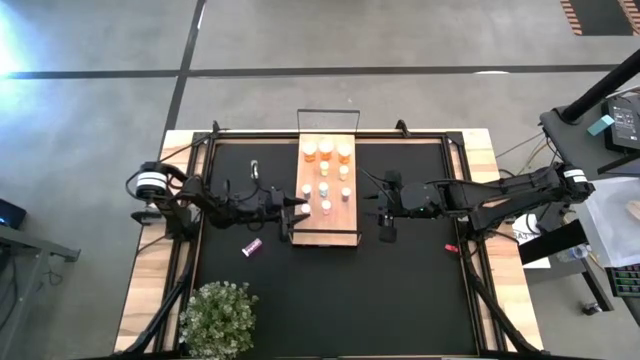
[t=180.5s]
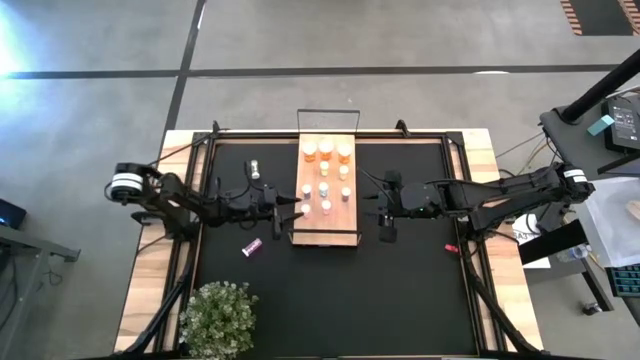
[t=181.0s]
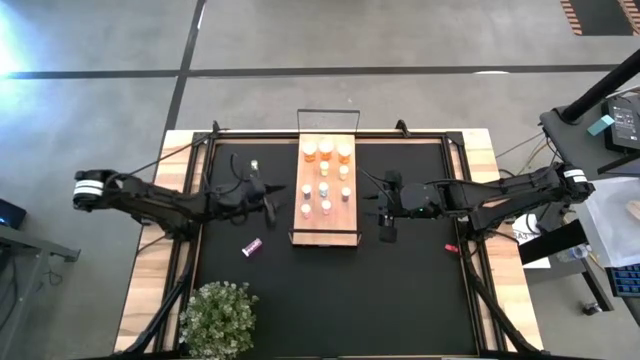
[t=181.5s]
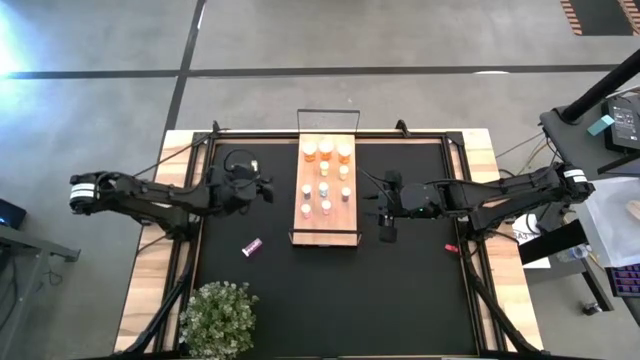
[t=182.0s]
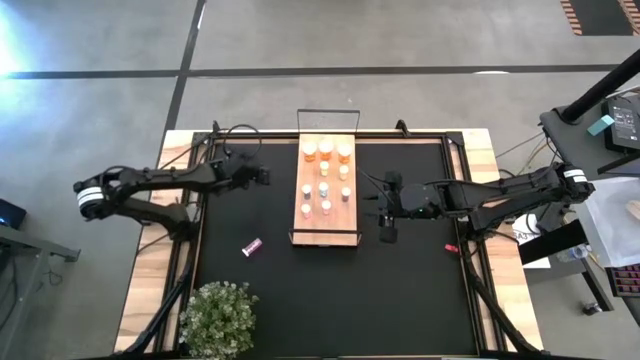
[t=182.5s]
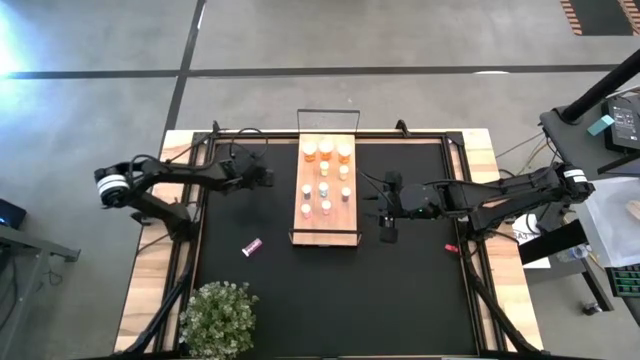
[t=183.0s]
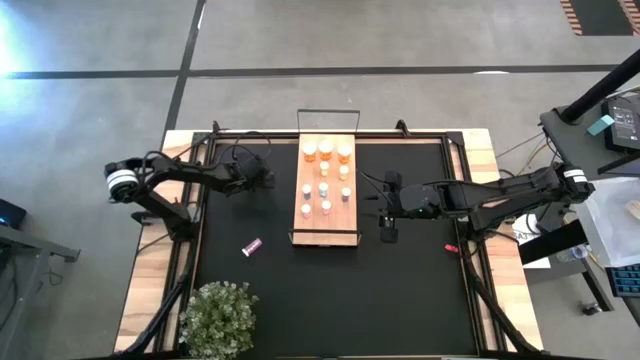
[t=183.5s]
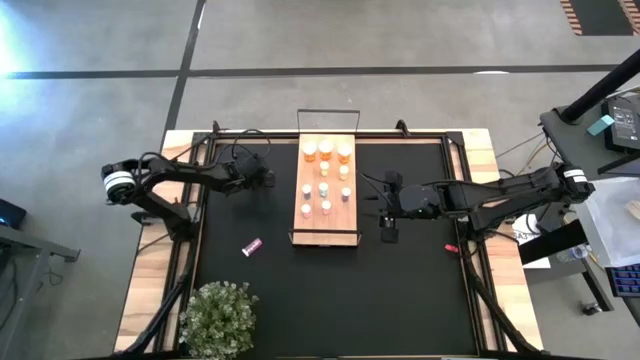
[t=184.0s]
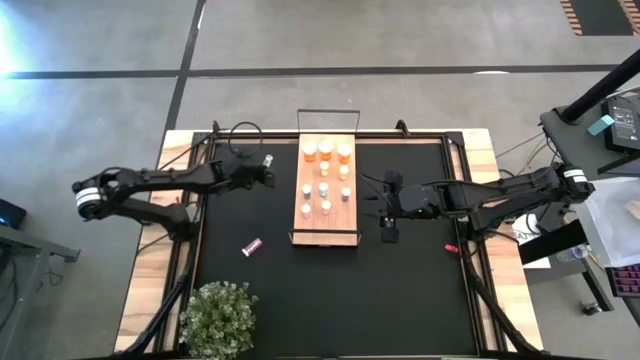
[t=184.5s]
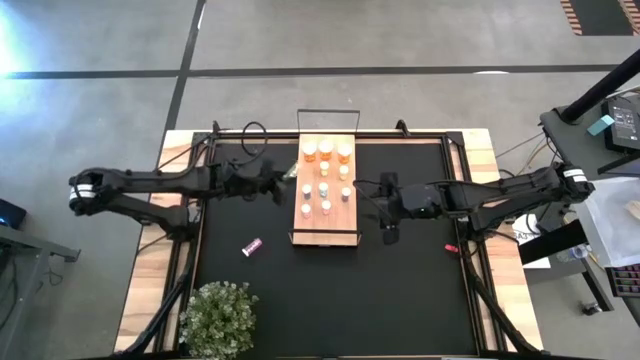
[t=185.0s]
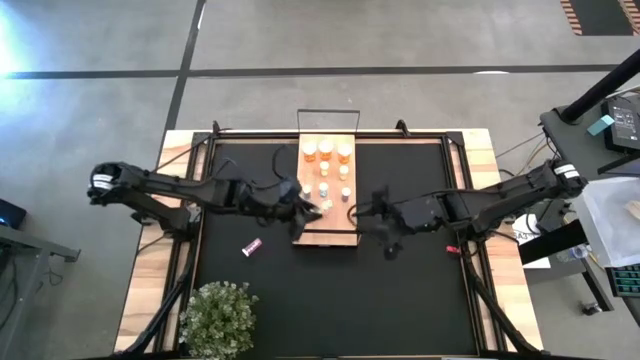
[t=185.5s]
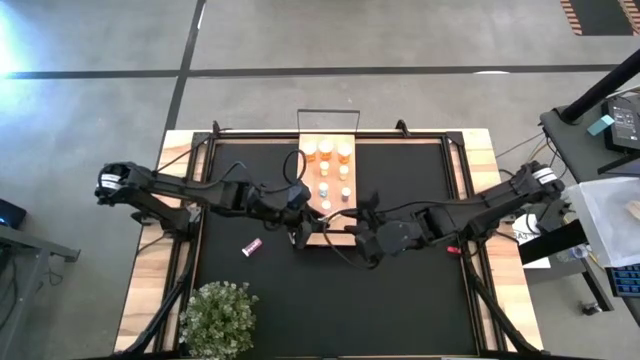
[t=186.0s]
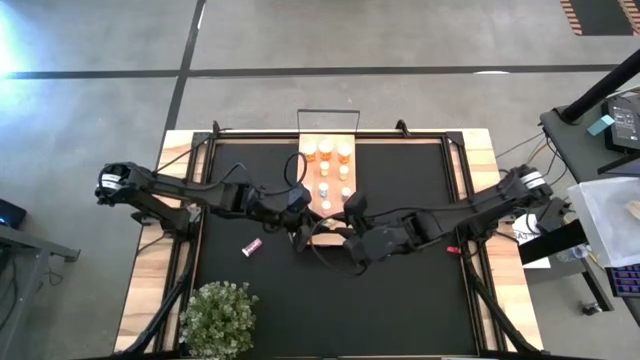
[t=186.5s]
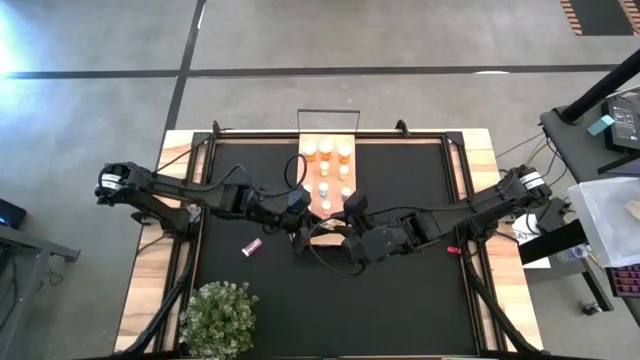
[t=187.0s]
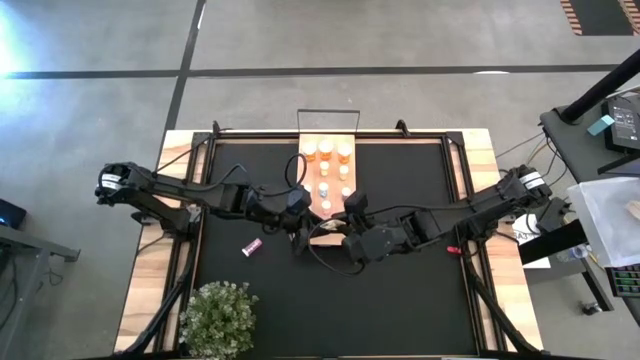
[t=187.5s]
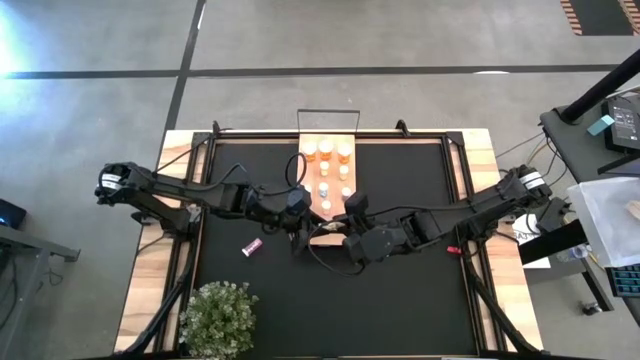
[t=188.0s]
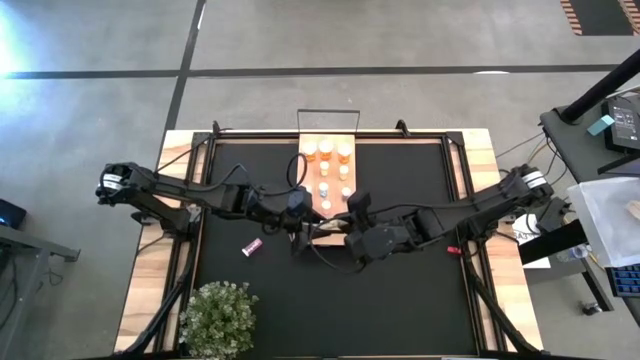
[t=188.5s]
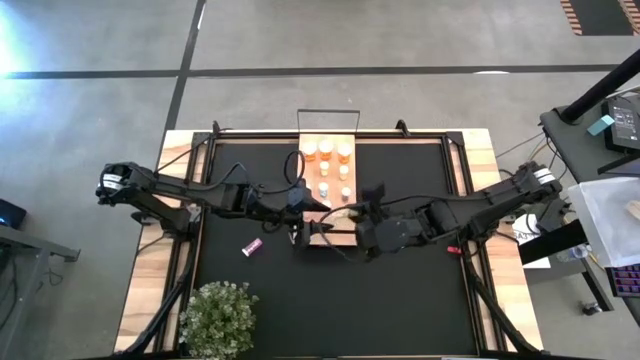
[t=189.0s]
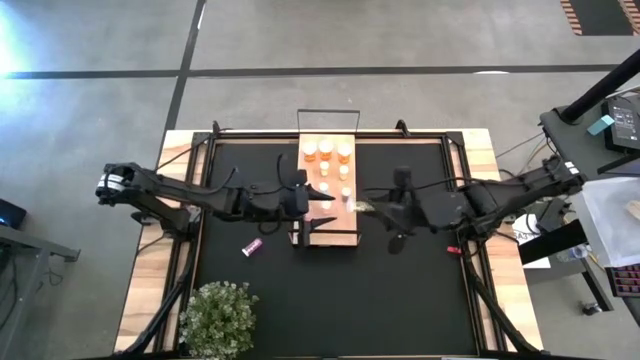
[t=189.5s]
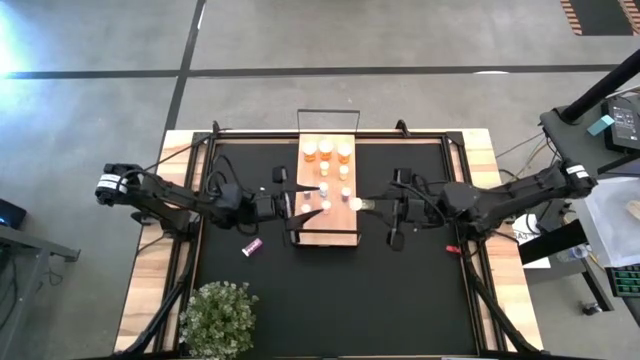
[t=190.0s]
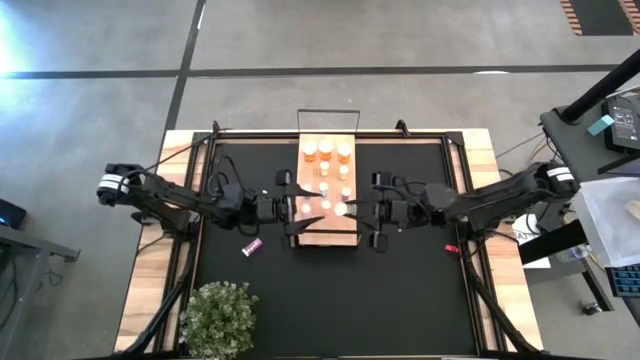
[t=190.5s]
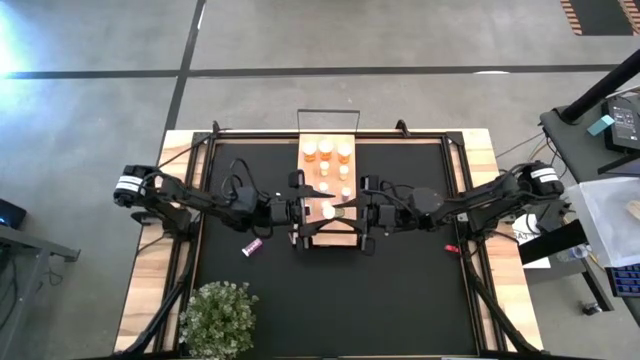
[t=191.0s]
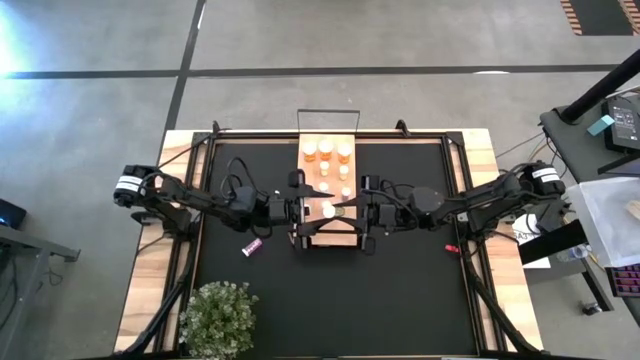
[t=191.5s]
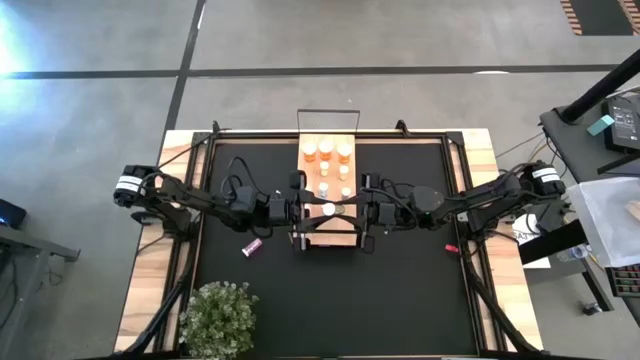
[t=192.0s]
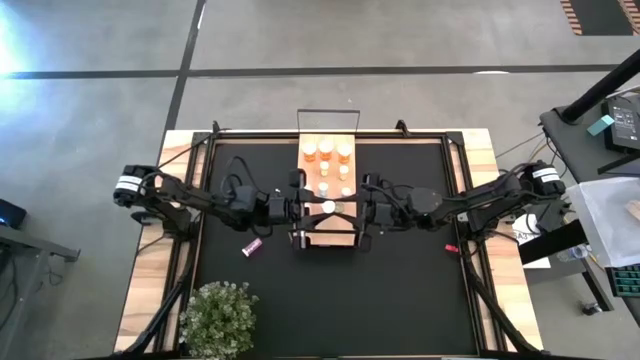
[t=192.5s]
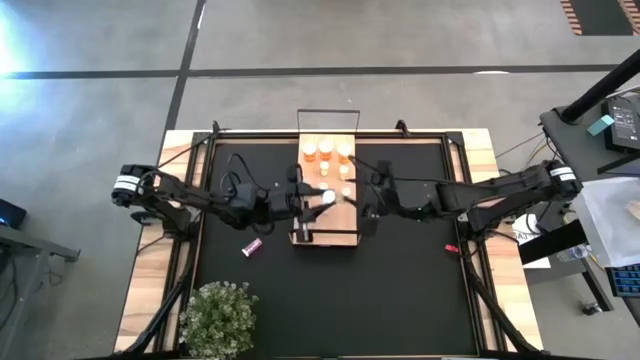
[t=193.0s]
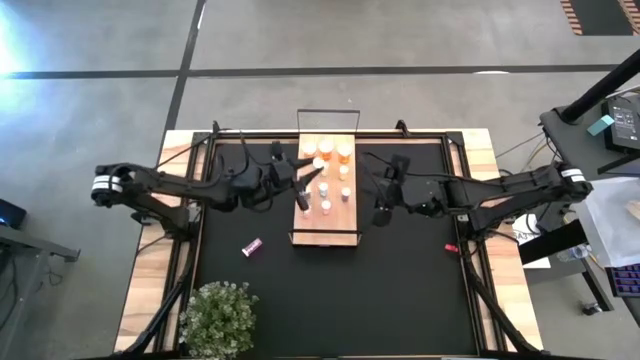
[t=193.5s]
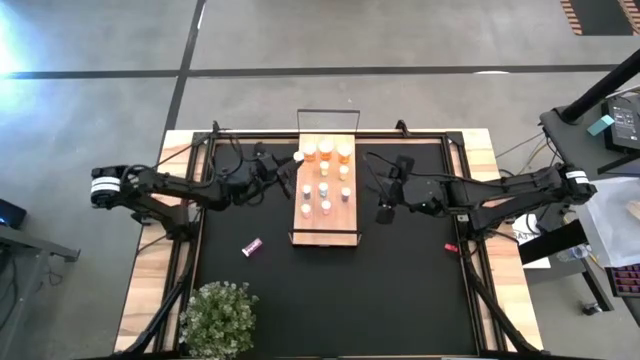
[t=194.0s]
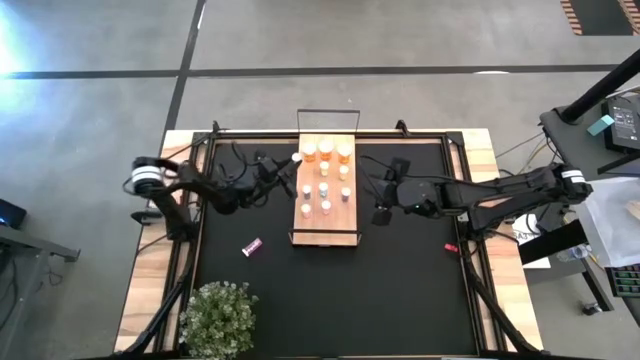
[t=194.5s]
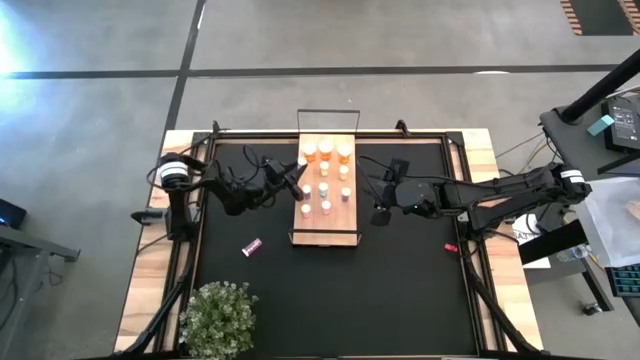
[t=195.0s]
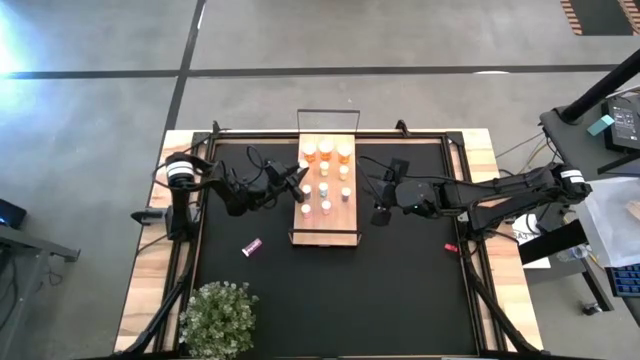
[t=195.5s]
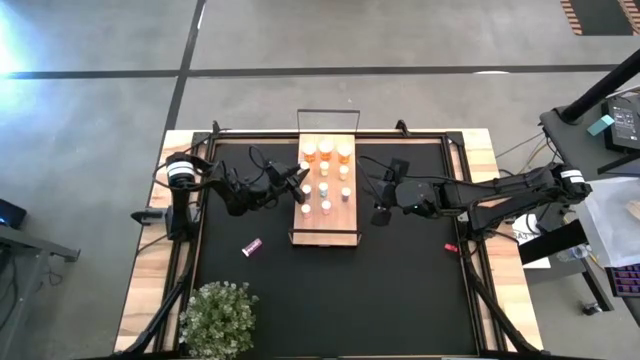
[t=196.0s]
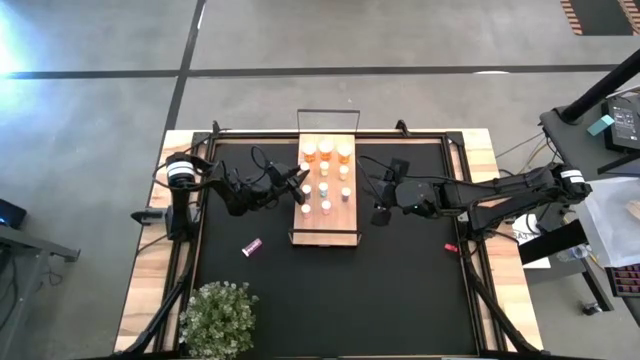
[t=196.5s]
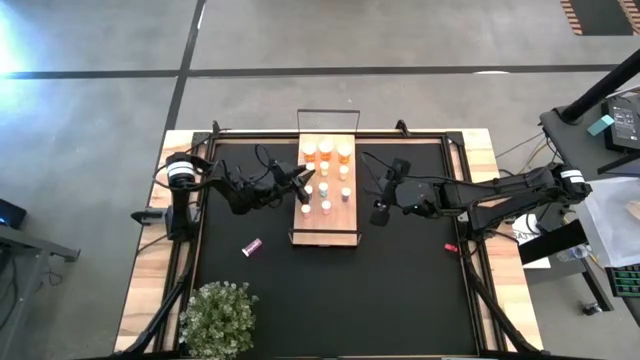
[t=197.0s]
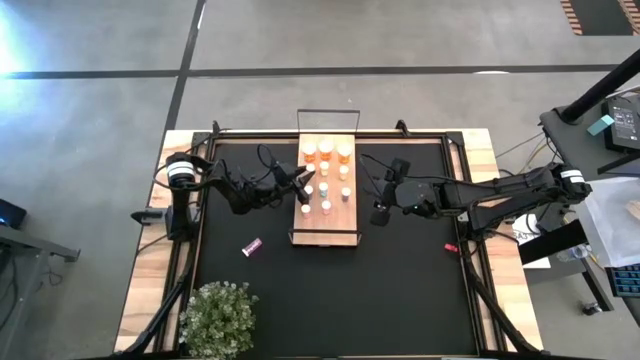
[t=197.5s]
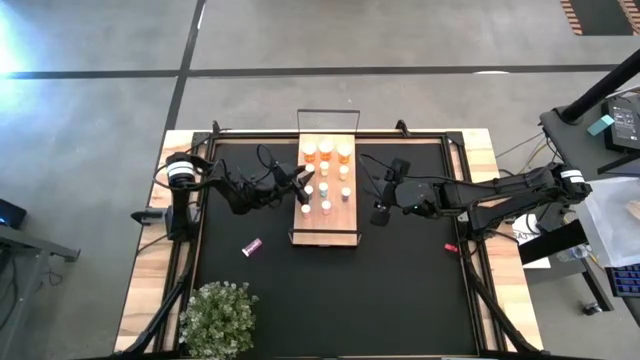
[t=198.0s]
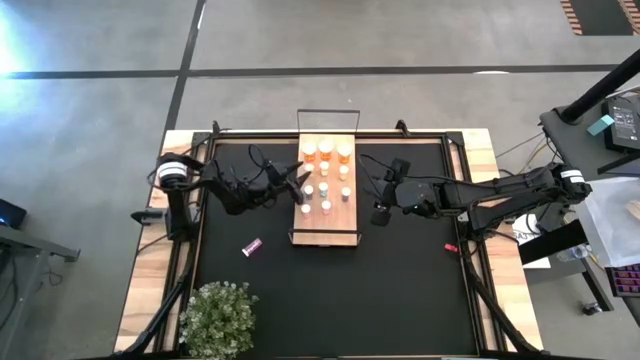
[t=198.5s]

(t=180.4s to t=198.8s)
Task: Pick and place medicine bottles onto shelf by color
Put the yellow medicine bottle on the shelf aligned with the other yellow medicine bottles

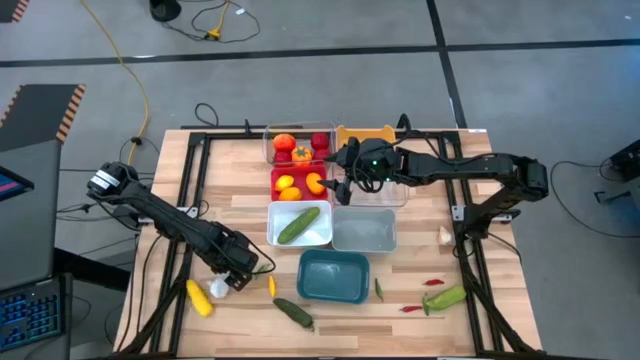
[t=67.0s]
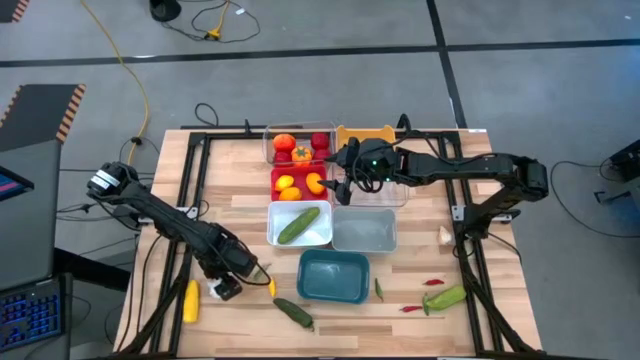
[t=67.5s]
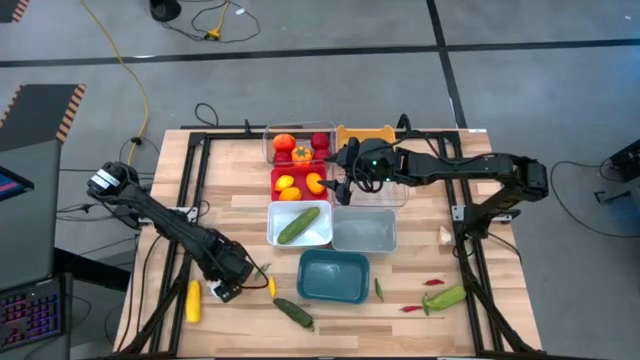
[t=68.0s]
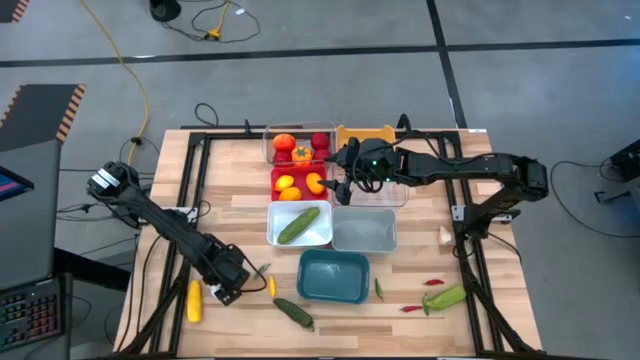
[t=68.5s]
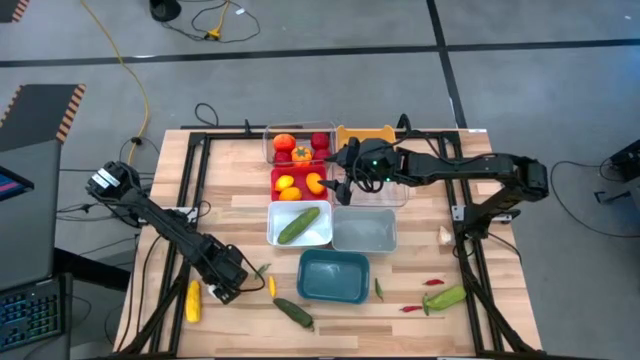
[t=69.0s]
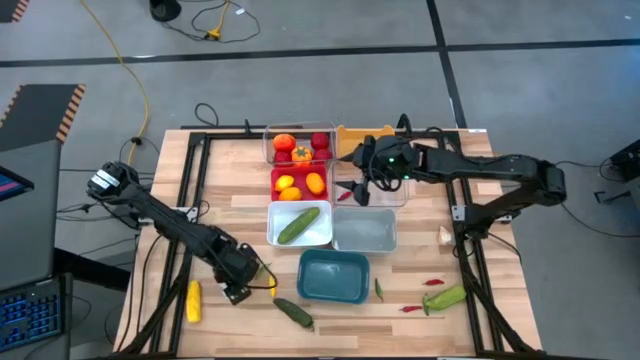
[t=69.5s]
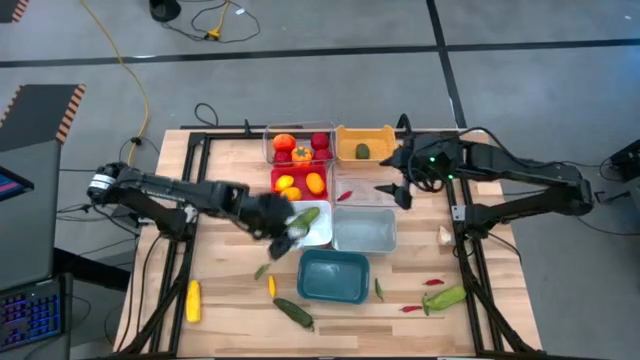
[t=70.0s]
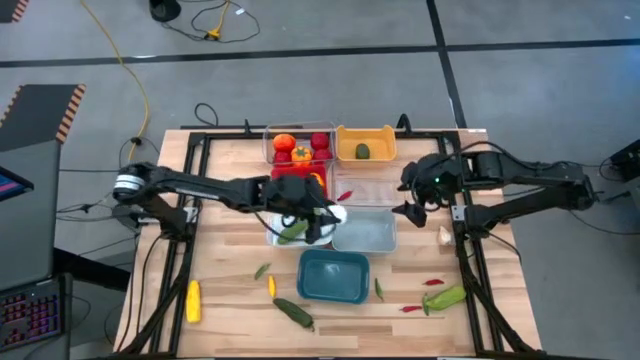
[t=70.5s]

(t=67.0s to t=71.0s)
Task: Sort produce into baskets
Put the left white garlic into the gray bin
